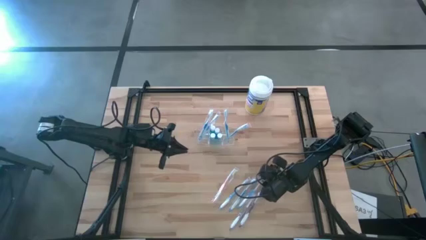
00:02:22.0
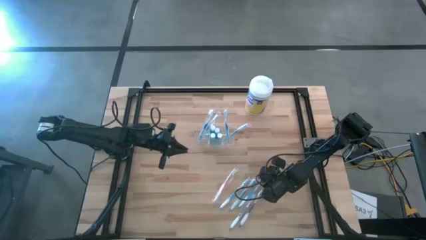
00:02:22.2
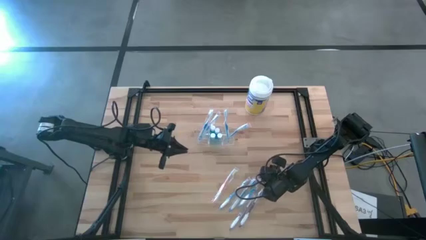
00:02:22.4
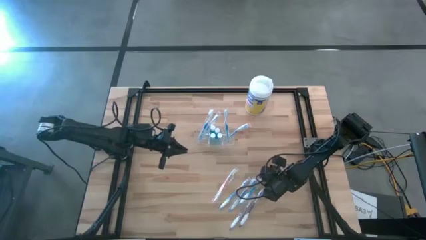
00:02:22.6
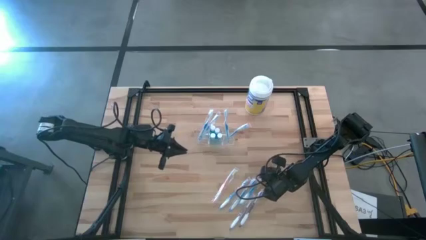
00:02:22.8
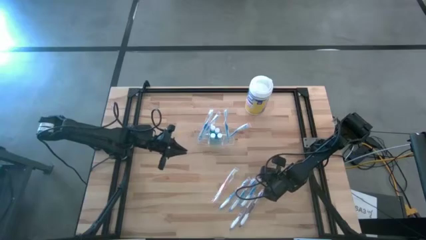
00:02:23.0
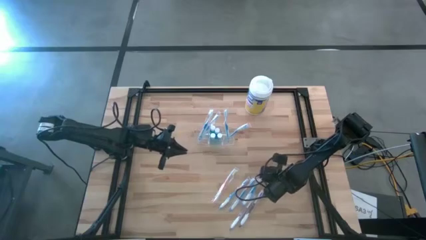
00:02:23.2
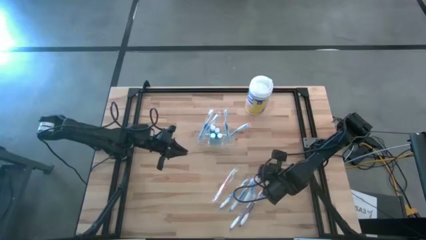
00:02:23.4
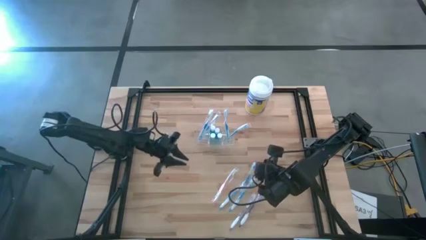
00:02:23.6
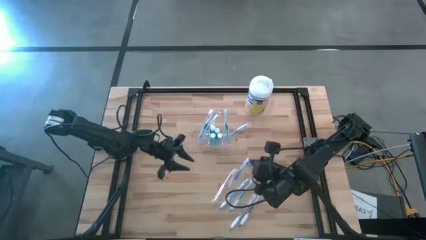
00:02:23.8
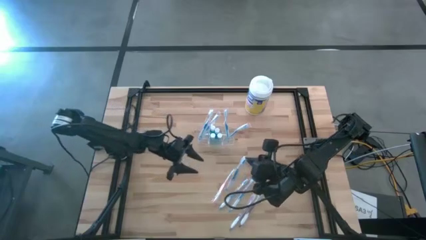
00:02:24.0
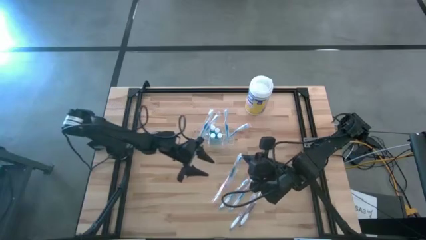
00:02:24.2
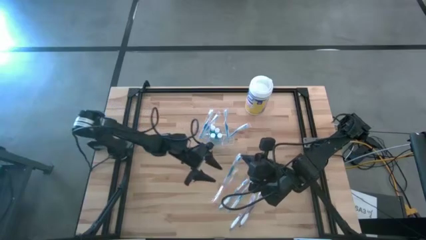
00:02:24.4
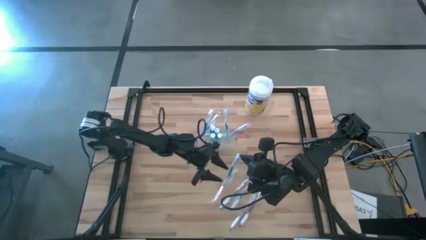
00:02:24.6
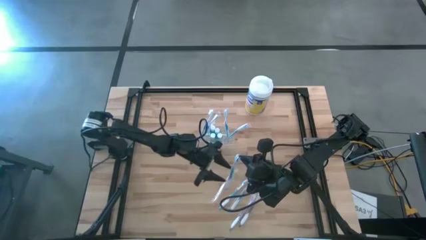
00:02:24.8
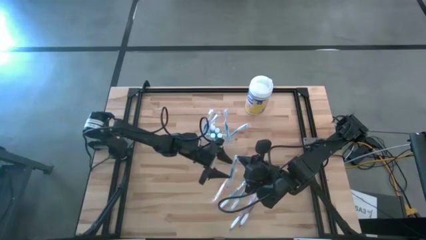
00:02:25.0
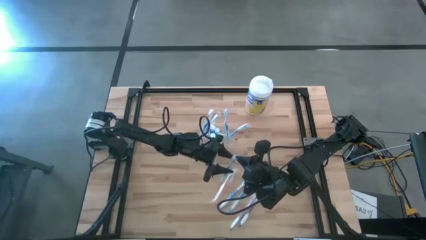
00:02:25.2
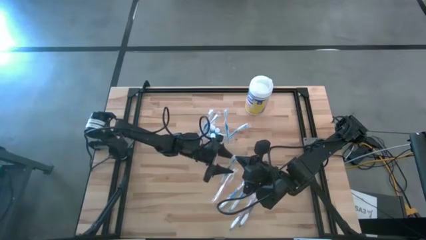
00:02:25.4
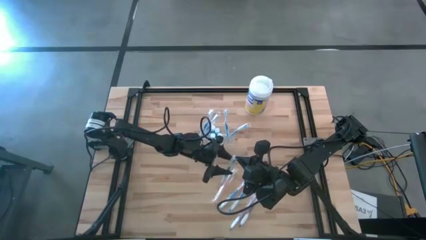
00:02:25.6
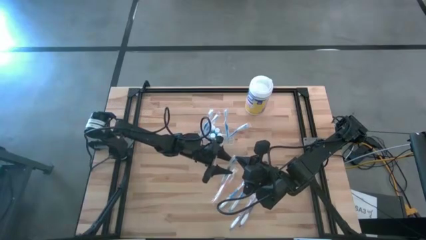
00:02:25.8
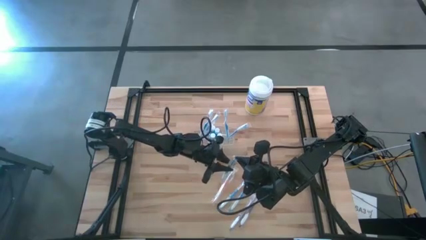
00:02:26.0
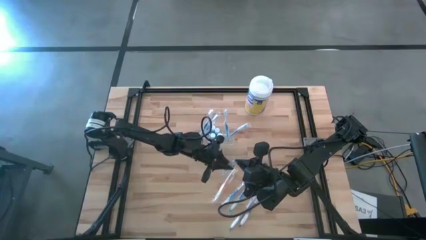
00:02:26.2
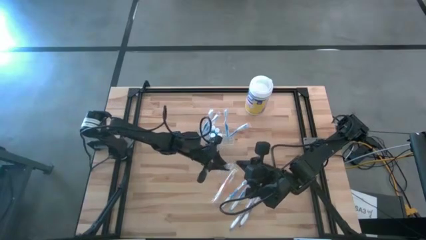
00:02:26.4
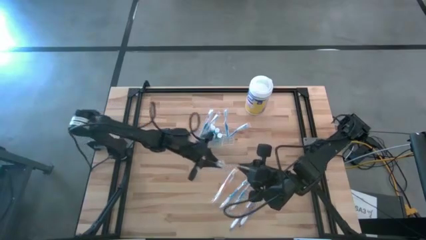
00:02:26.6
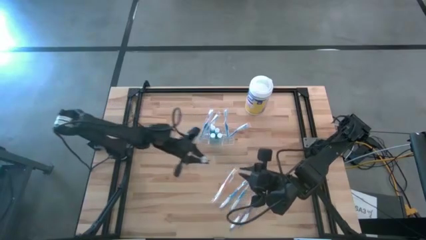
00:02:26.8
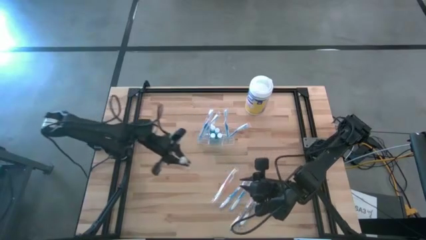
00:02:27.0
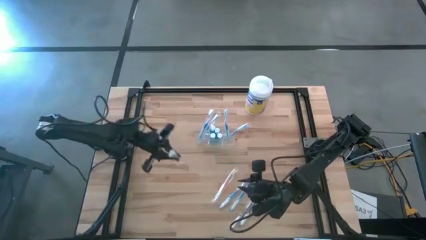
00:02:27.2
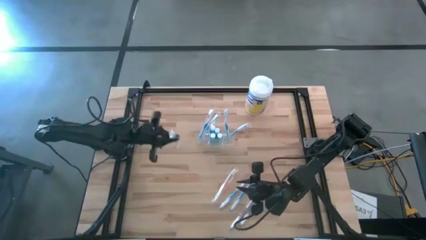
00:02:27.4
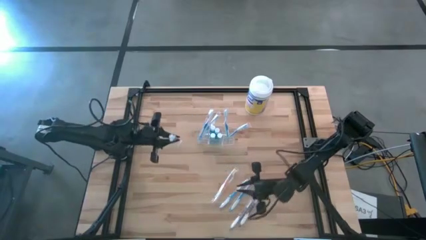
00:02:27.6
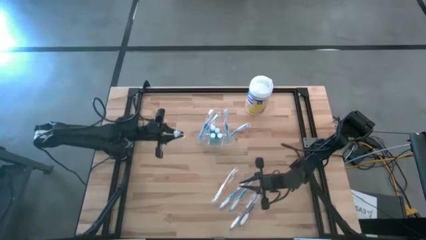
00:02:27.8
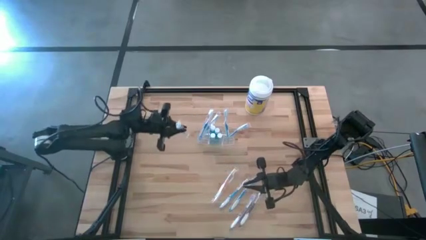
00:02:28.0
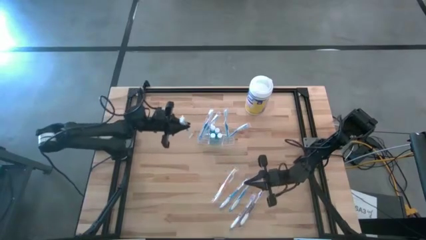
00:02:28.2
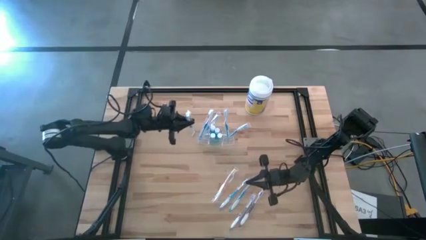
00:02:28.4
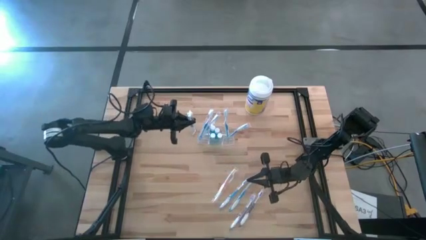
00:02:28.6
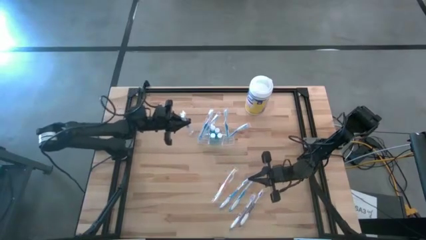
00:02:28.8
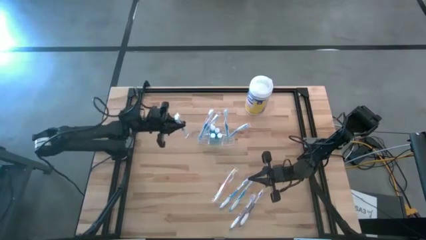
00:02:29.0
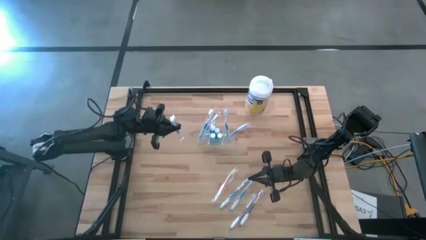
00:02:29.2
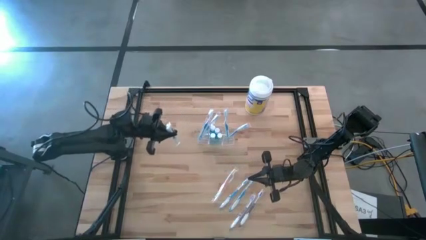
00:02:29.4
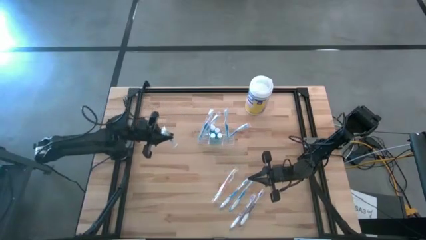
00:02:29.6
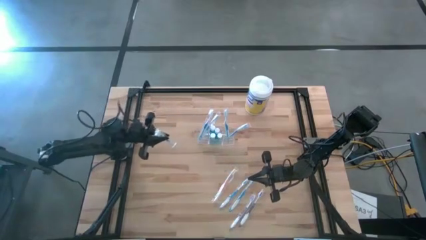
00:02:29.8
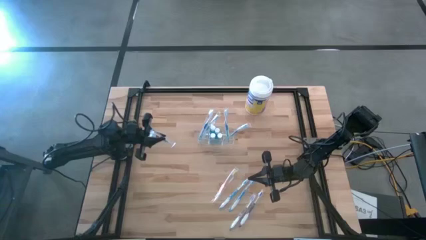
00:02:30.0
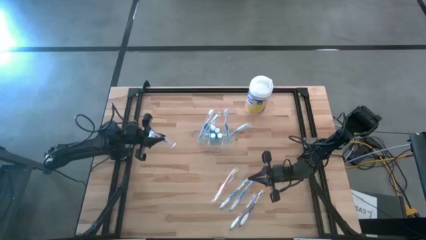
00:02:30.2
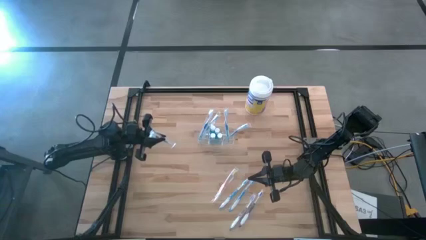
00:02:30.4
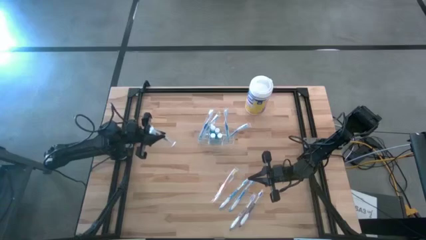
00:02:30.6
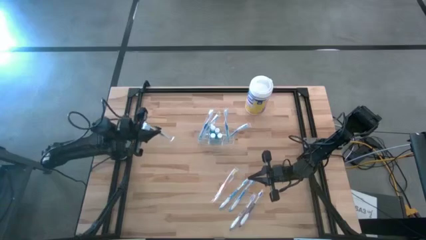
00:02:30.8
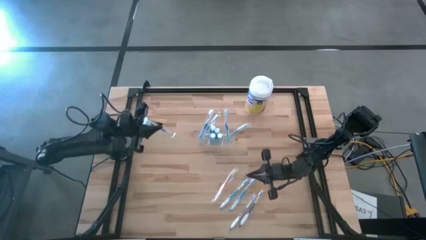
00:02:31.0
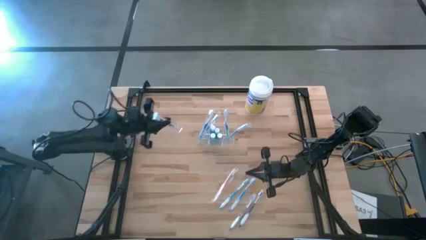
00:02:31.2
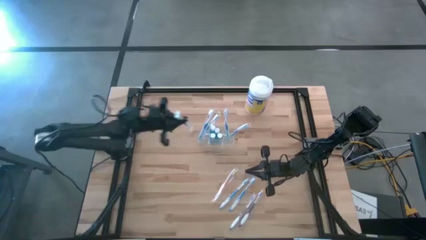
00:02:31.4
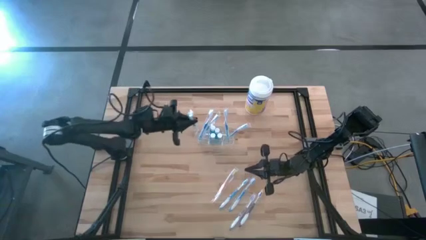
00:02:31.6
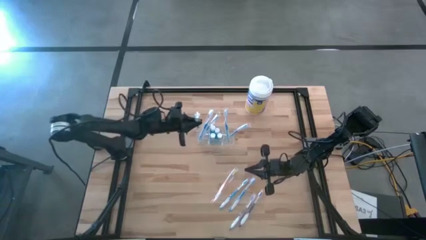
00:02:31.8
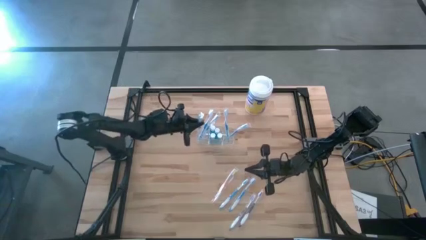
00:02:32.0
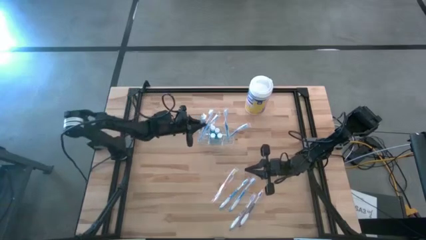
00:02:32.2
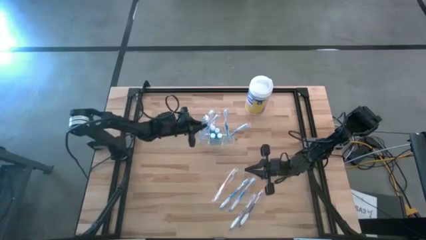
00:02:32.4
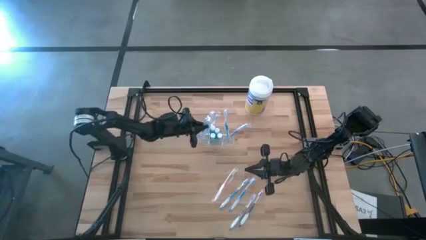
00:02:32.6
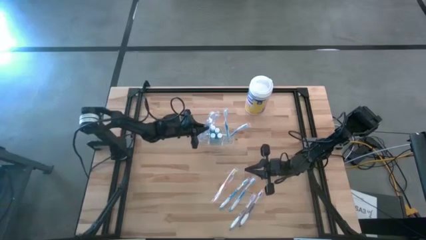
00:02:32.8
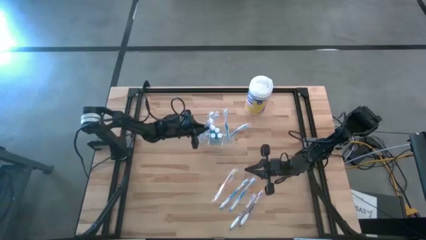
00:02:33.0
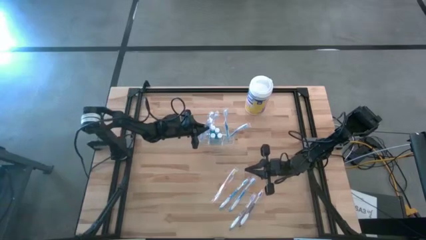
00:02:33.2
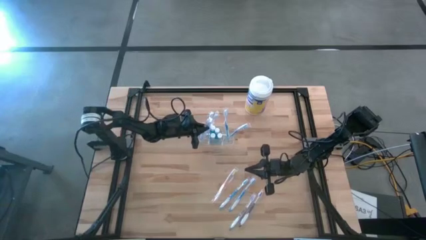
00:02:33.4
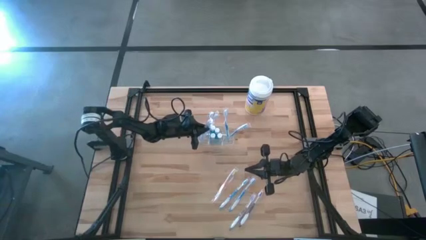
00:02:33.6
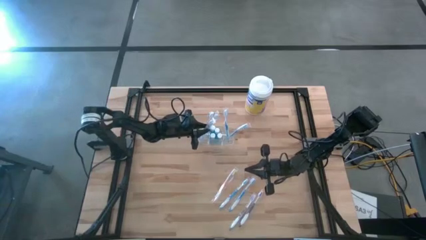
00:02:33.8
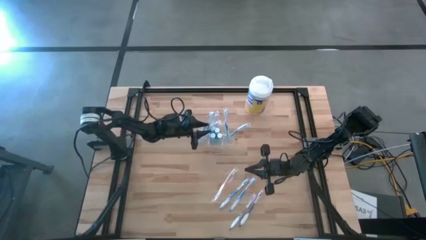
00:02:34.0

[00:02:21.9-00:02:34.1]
Task: Pick & Place toothbrushing station
Put the blue toothbrush into the transparent organizer
